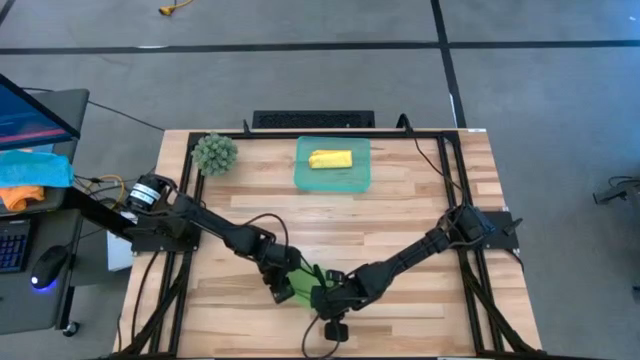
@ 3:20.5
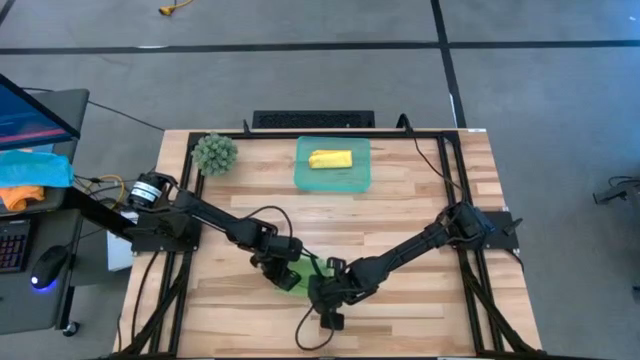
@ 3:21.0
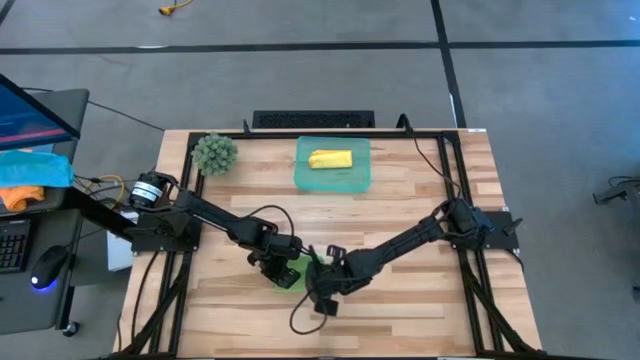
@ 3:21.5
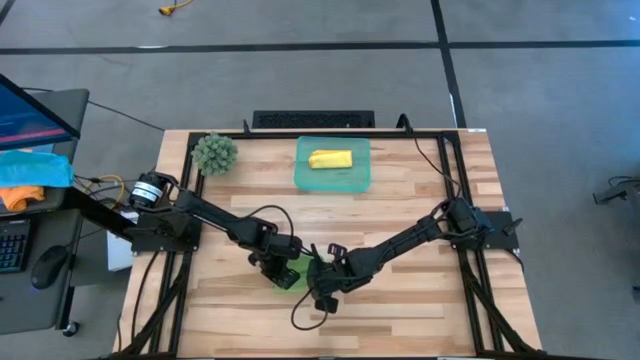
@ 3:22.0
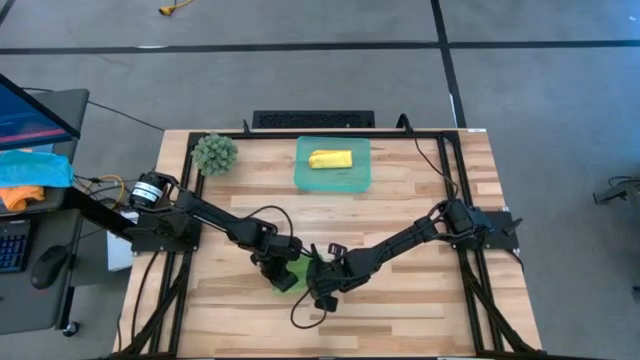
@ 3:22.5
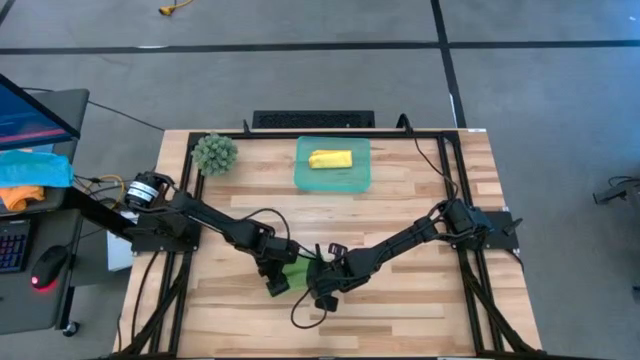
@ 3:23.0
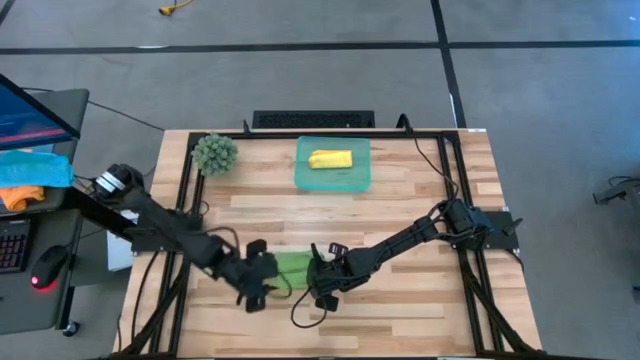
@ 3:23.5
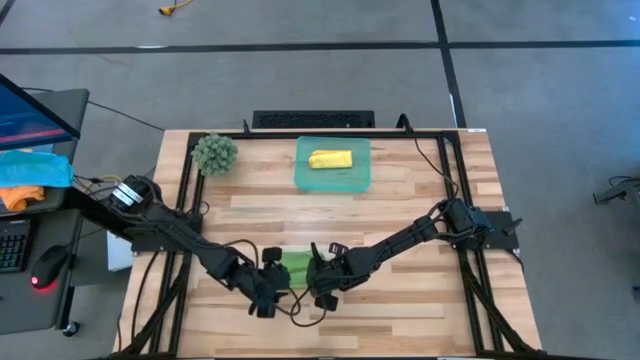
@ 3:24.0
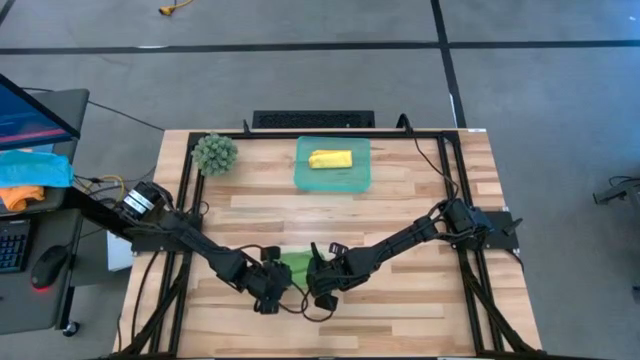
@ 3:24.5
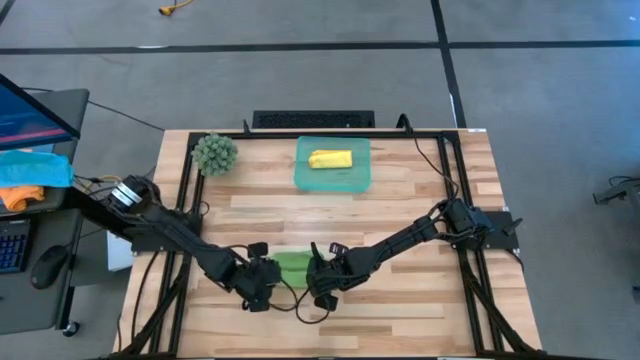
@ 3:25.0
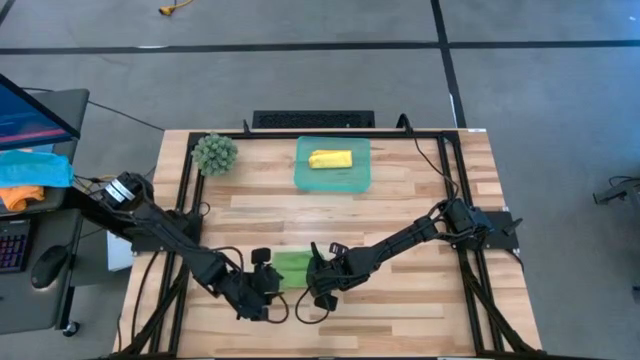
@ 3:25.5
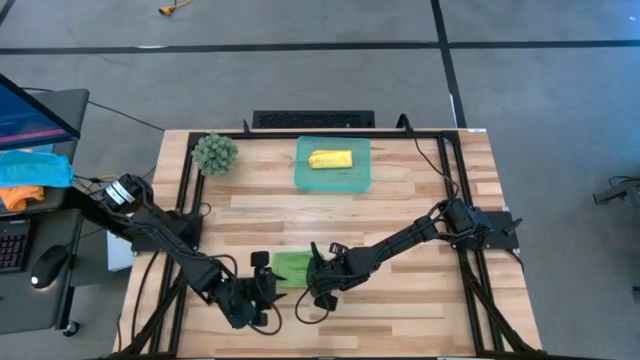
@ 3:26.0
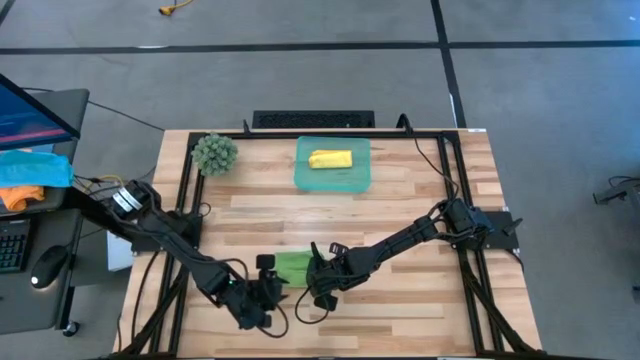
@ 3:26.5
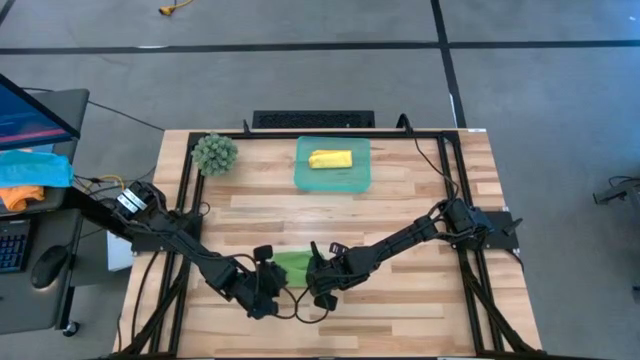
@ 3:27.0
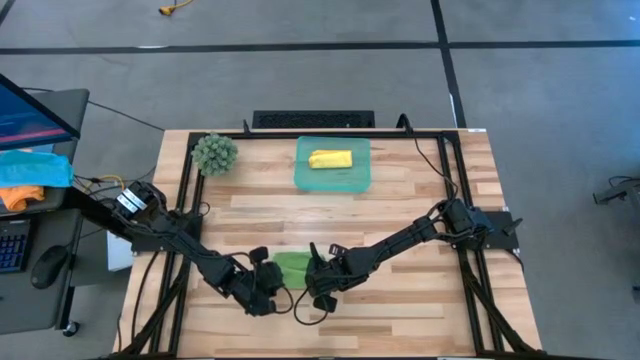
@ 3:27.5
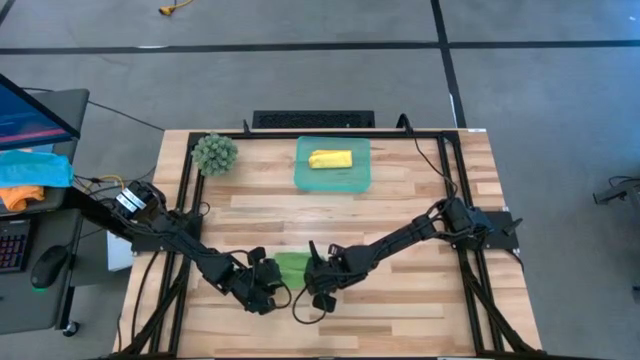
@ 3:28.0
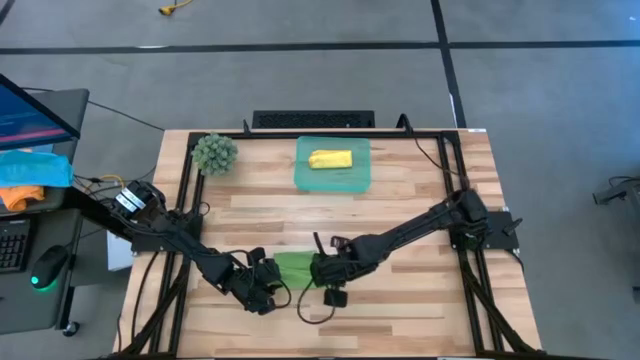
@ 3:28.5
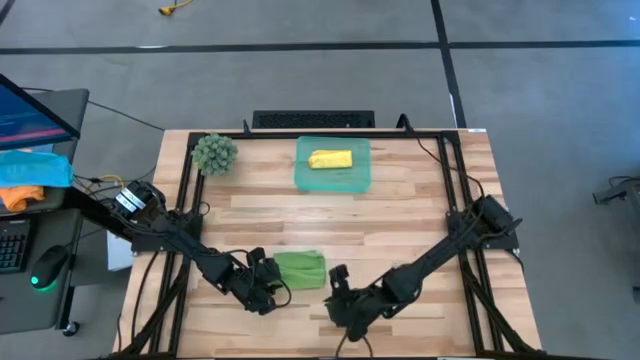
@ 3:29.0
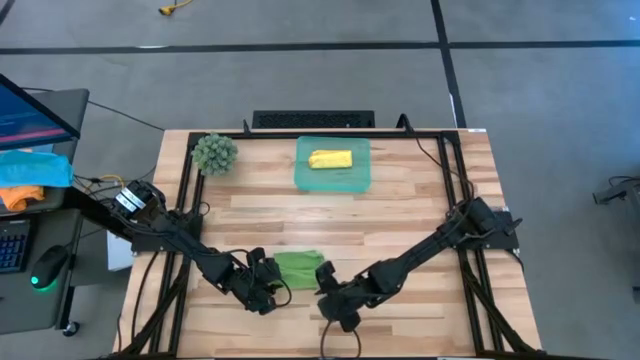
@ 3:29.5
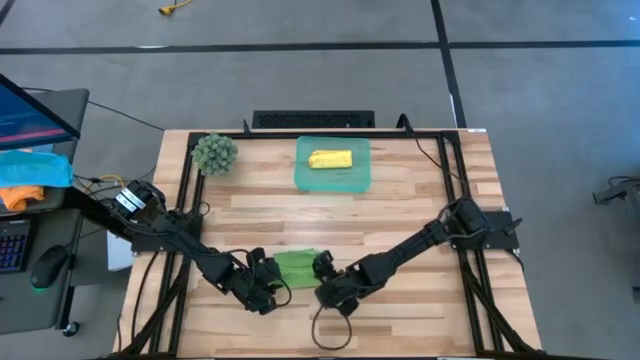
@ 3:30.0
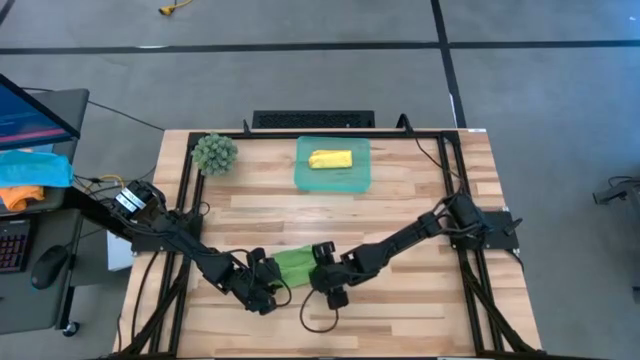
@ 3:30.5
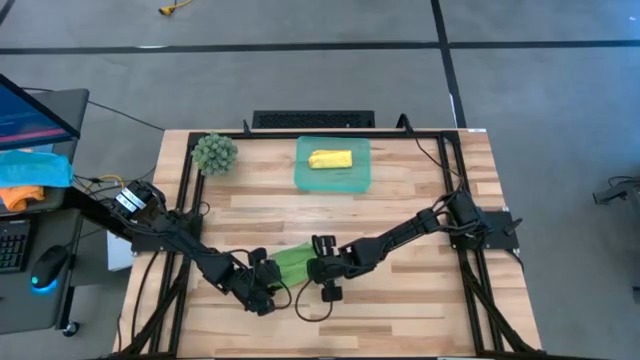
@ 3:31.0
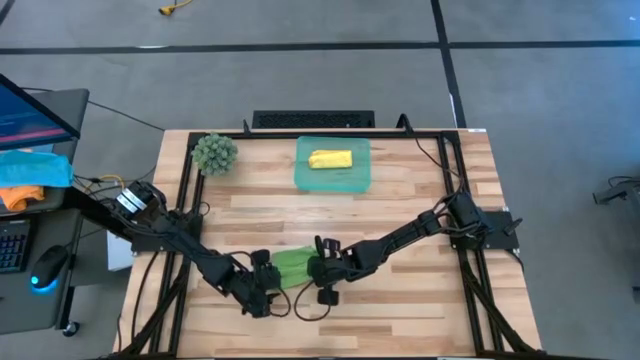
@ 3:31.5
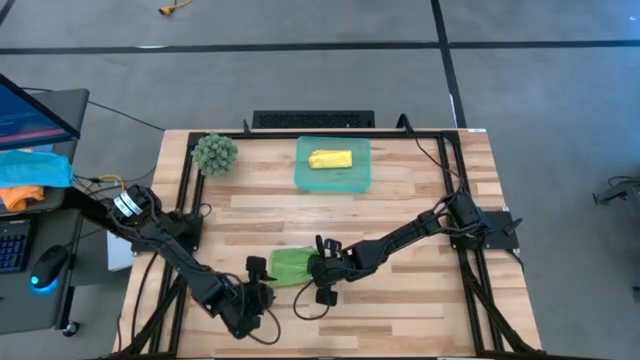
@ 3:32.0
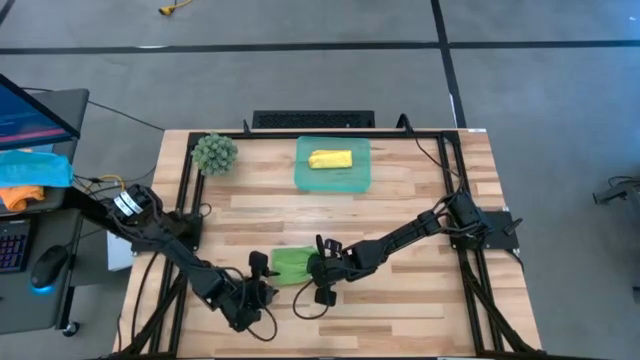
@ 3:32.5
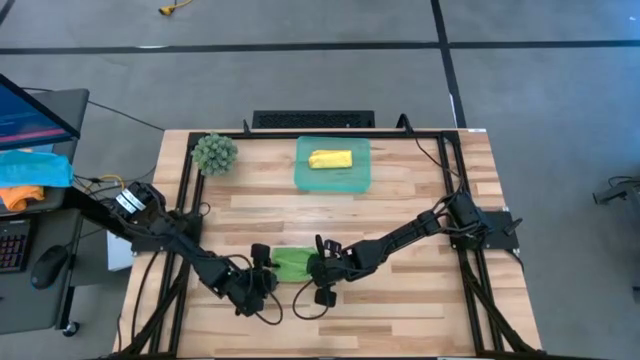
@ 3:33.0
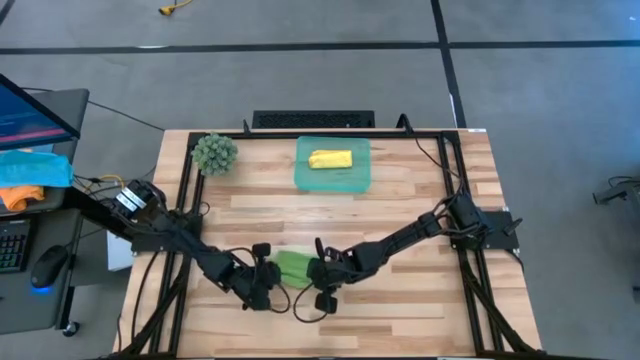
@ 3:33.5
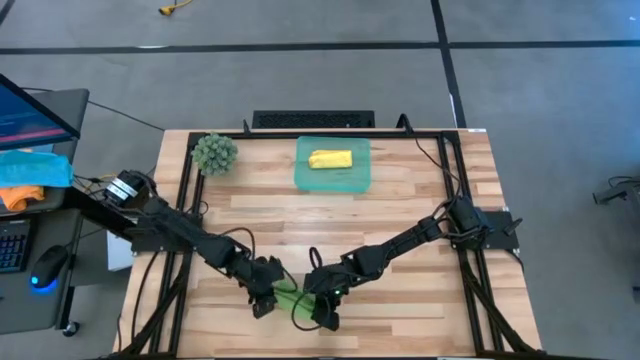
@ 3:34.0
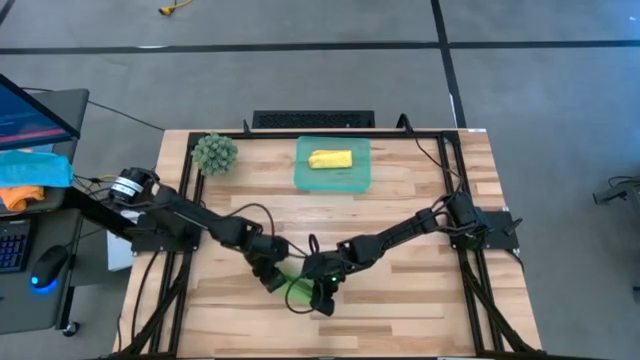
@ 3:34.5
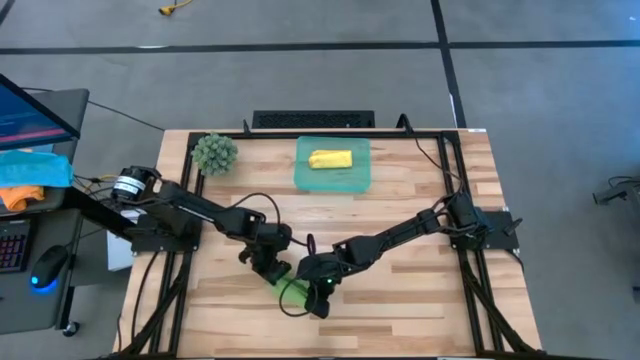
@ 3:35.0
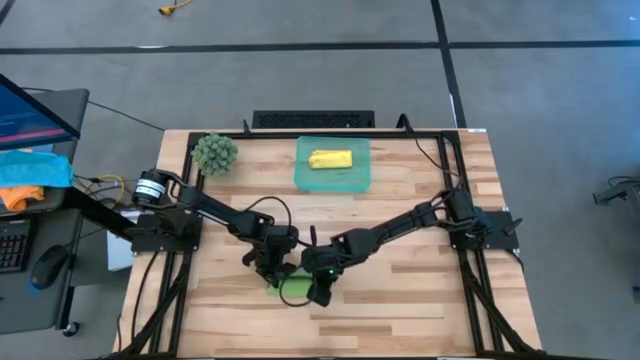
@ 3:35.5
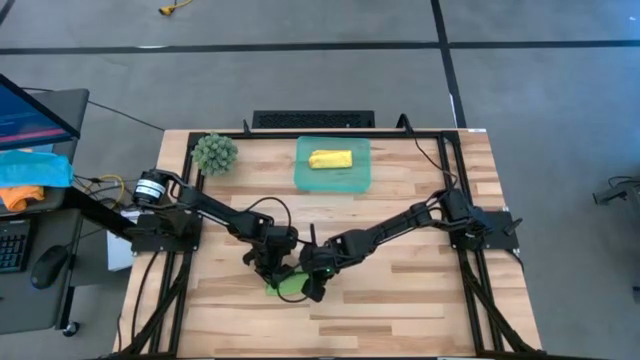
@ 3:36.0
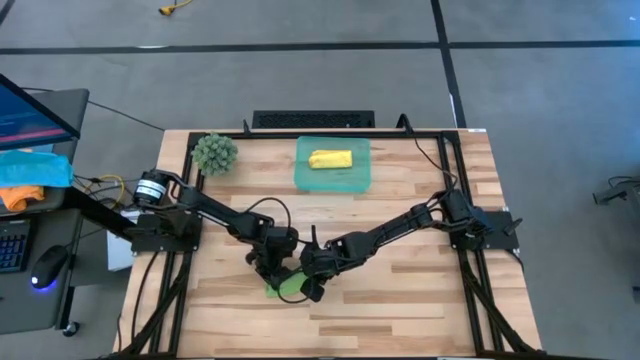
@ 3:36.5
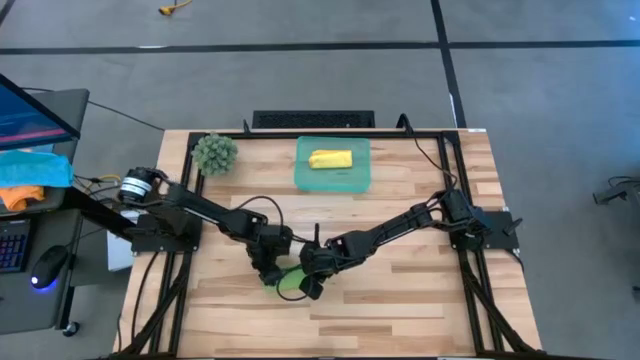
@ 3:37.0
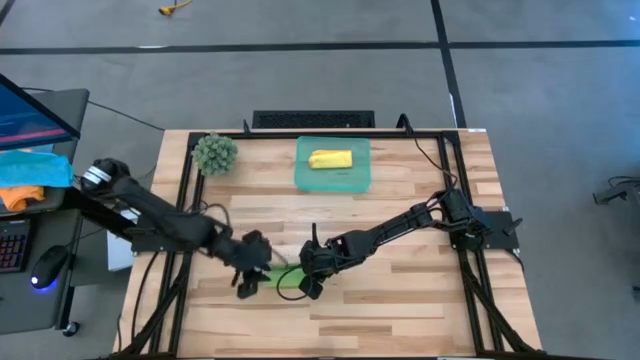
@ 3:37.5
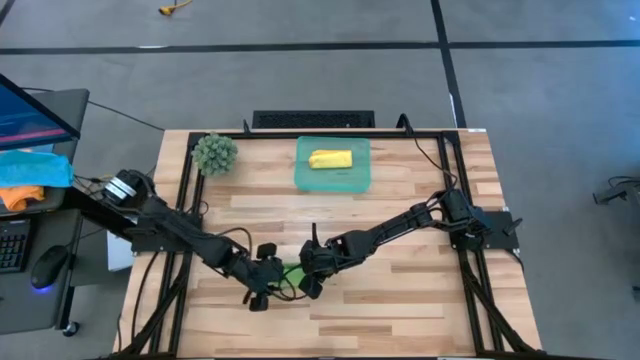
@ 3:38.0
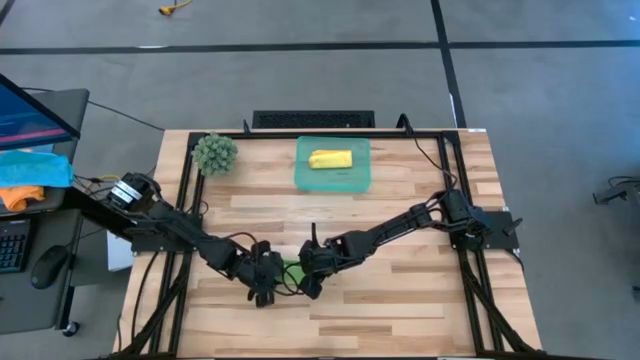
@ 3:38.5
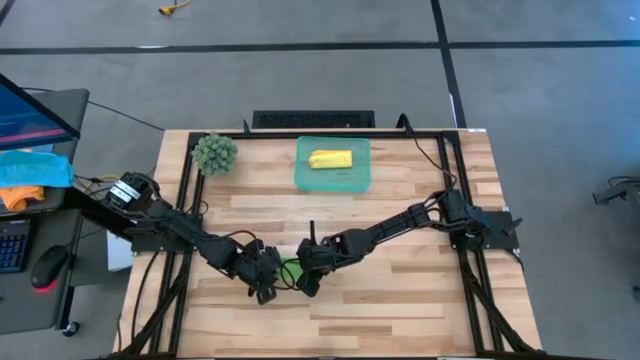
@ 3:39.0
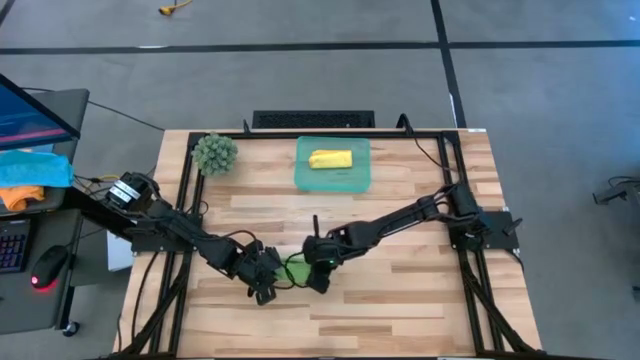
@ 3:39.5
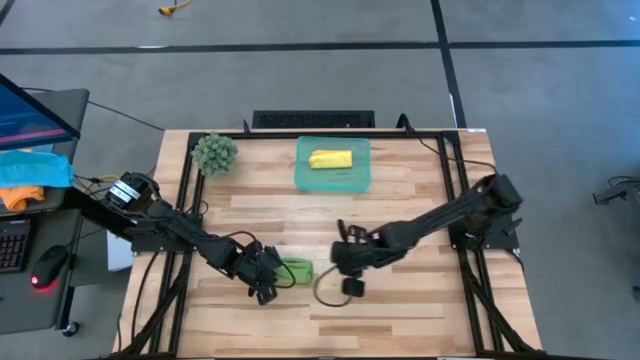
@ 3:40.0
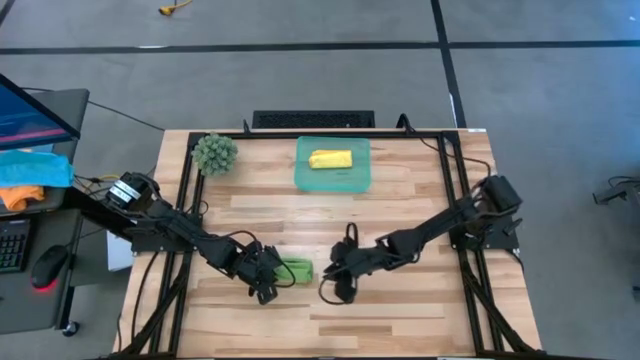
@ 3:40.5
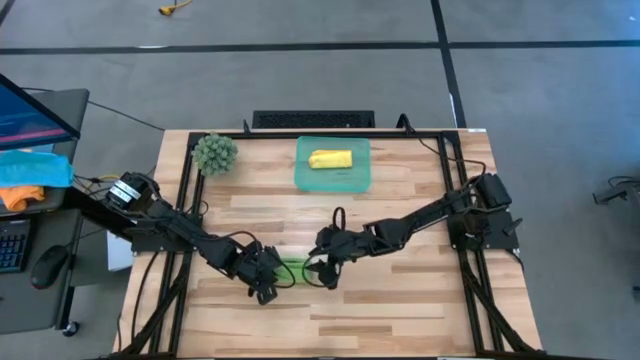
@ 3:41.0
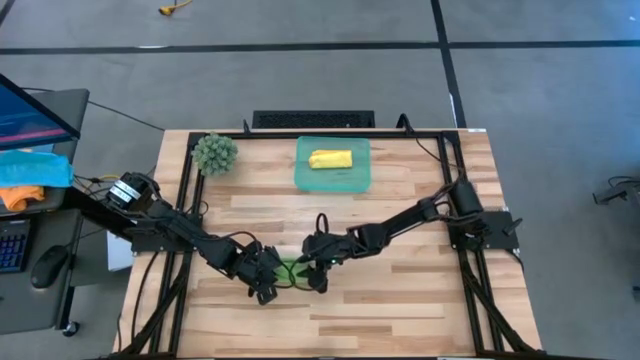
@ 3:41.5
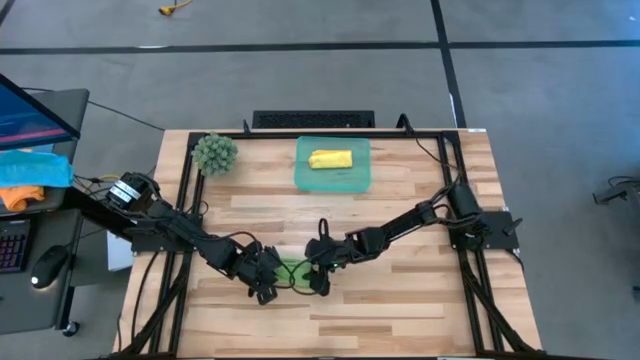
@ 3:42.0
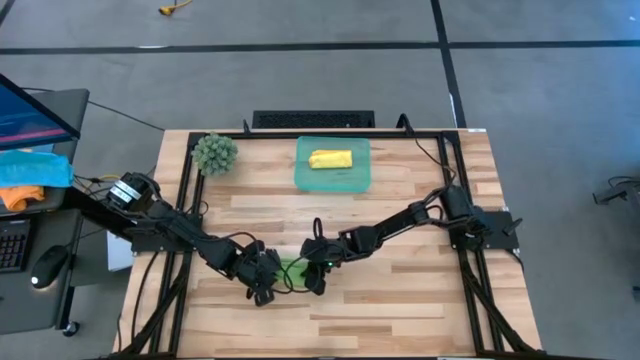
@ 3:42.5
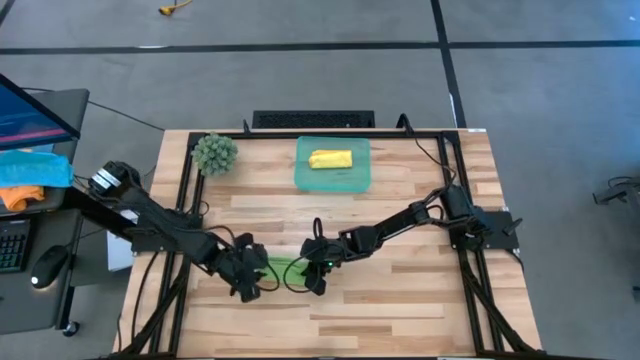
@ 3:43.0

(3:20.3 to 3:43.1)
Task: Roll microfiber towels into tight, uniform cylinder then place into a basket
Roll the green microfiber cloth
